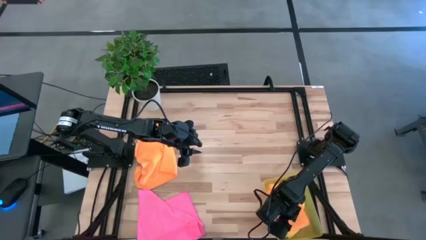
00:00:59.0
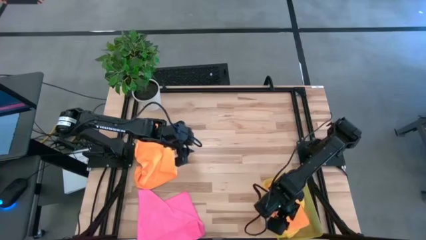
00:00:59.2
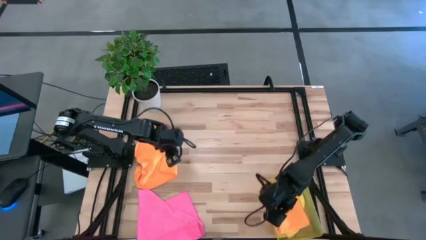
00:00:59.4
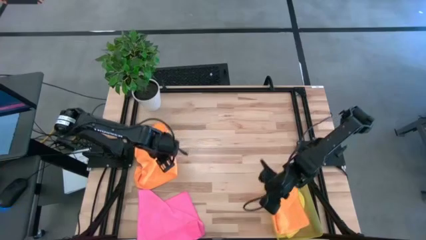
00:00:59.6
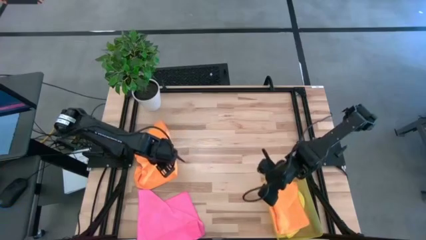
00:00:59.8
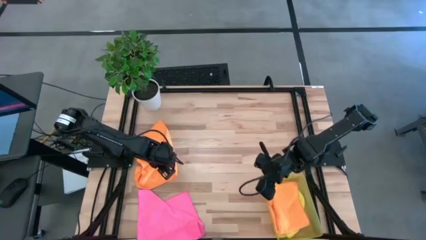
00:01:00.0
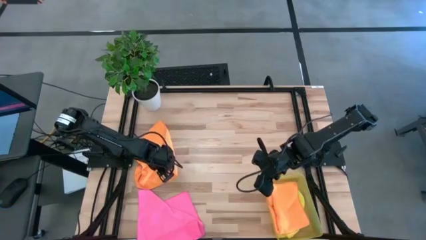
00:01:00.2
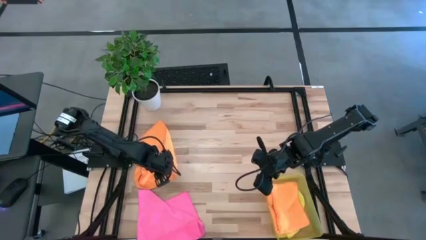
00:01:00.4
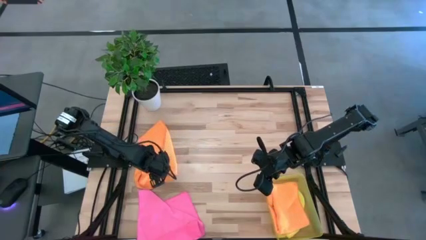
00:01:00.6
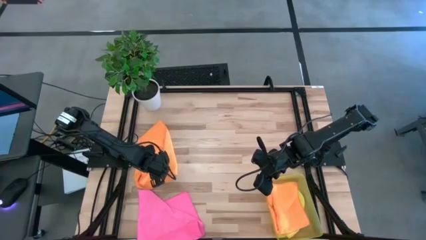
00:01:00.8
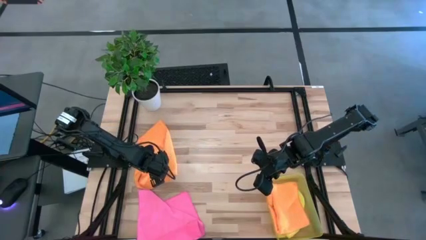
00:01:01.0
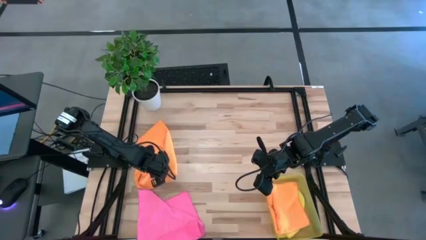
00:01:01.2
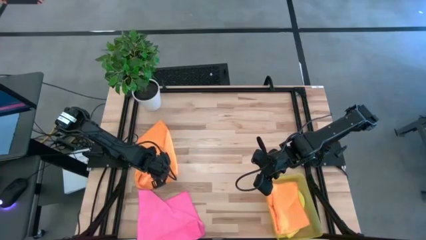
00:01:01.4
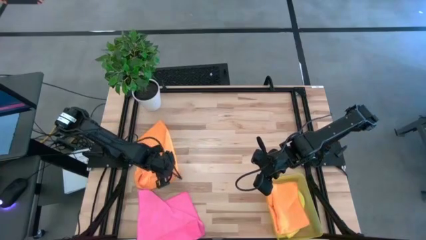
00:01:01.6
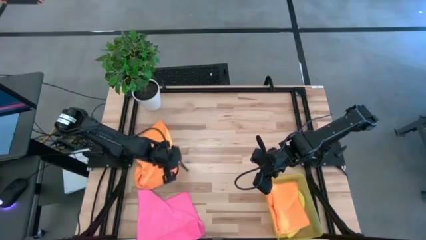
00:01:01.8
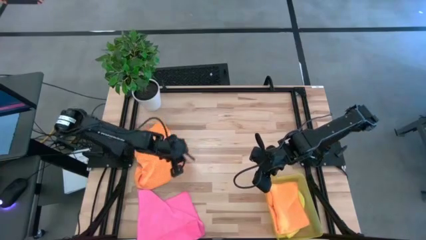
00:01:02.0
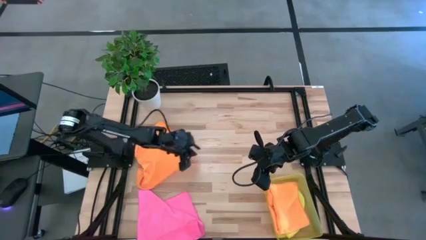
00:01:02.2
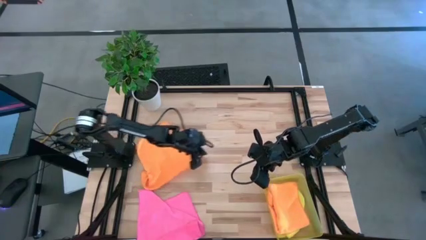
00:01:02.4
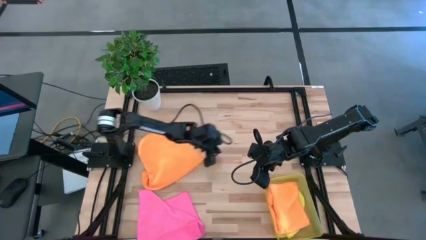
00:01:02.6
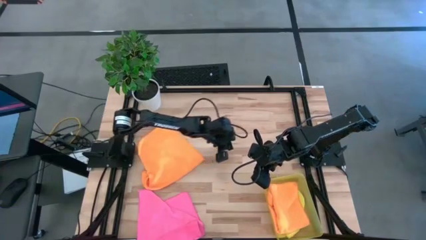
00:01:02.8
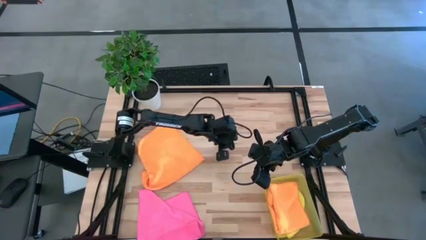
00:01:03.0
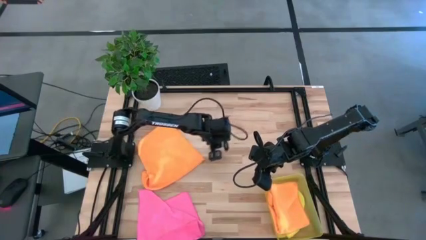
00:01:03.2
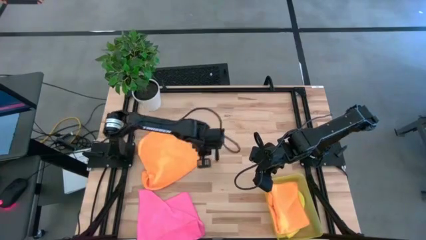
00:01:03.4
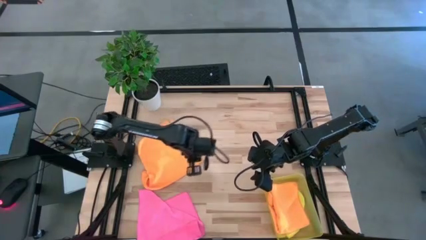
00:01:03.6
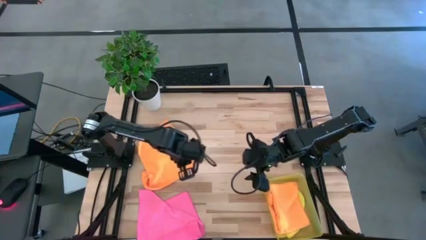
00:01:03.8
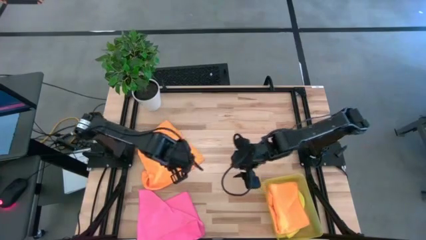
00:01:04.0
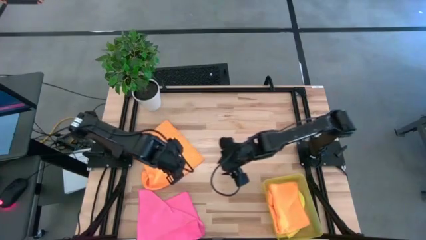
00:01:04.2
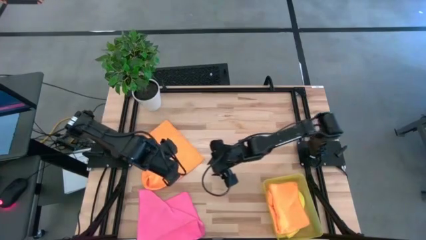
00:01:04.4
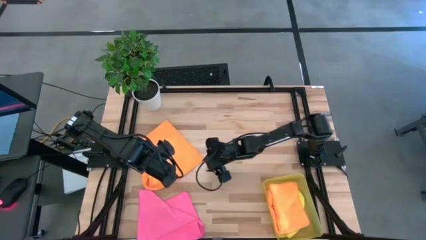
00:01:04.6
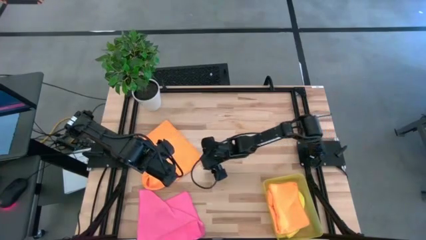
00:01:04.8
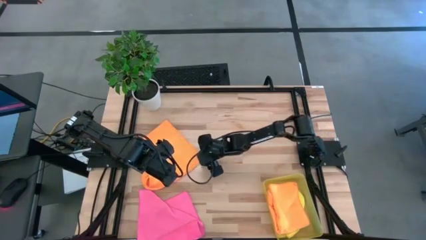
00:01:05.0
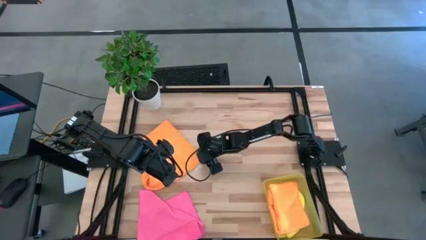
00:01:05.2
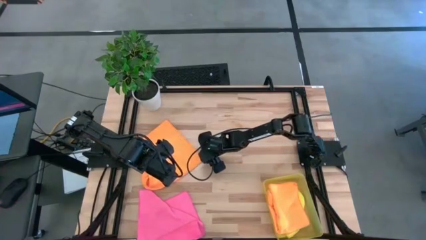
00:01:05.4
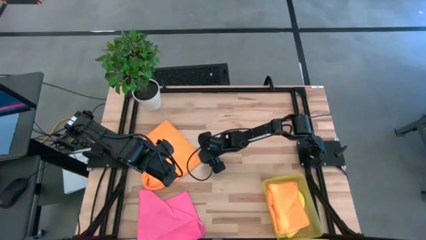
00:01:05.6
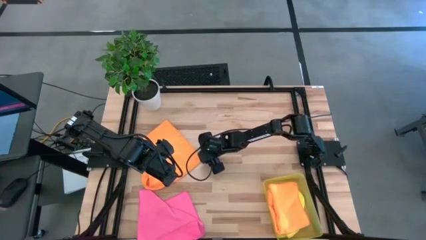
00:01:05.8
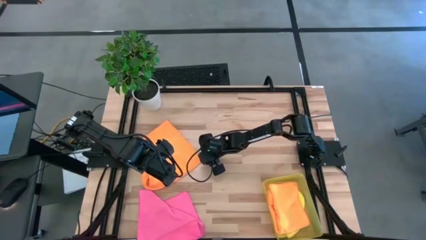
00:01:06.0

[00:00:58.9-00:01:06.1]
Task: Fold microfiber towels
Fold the orange cloth

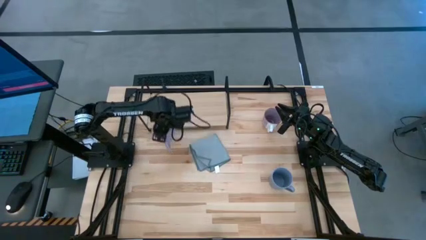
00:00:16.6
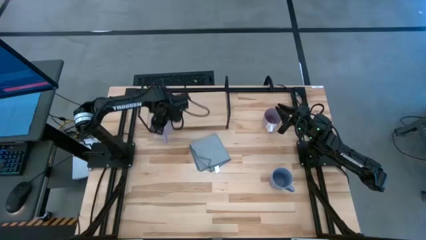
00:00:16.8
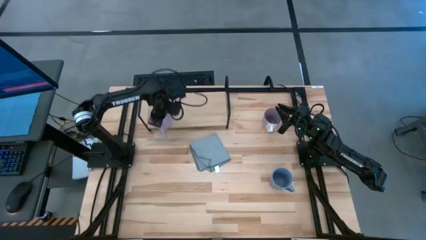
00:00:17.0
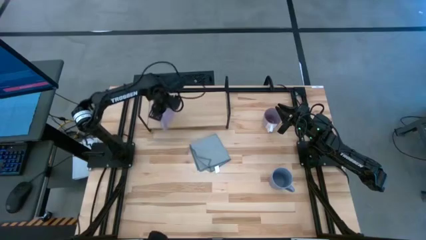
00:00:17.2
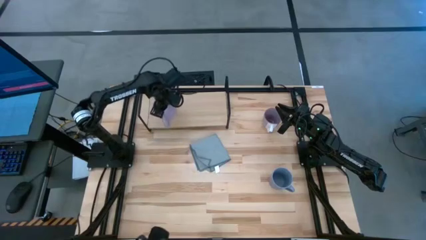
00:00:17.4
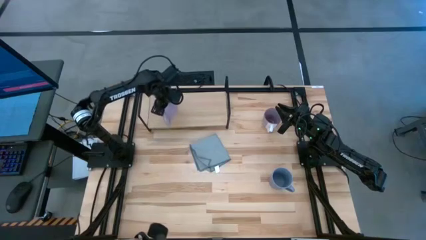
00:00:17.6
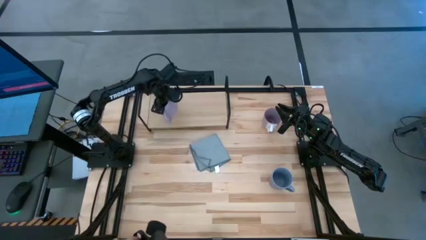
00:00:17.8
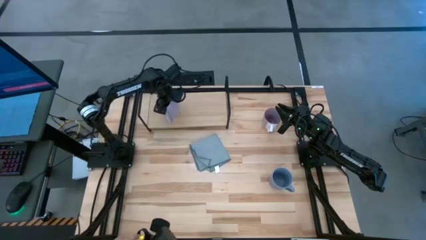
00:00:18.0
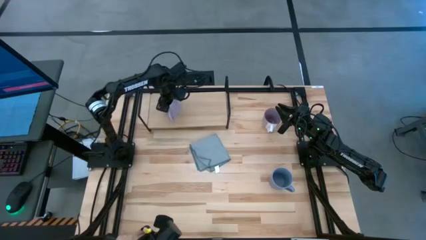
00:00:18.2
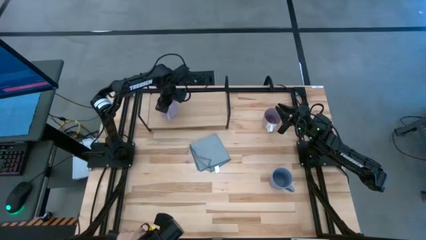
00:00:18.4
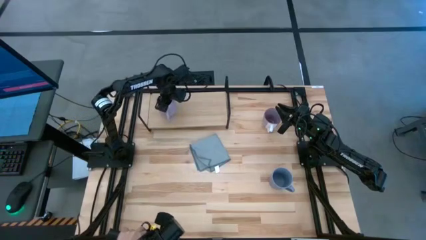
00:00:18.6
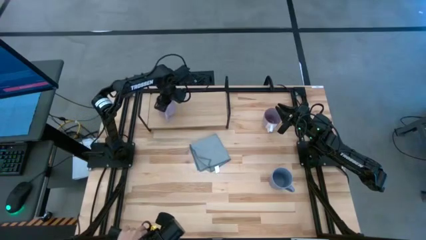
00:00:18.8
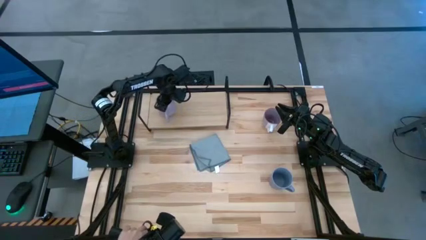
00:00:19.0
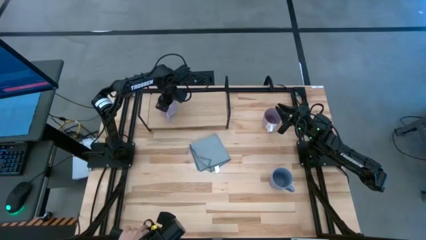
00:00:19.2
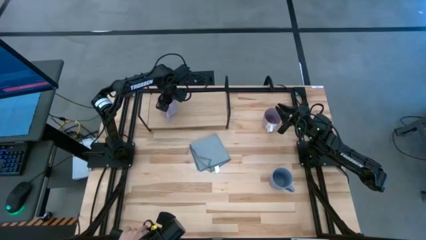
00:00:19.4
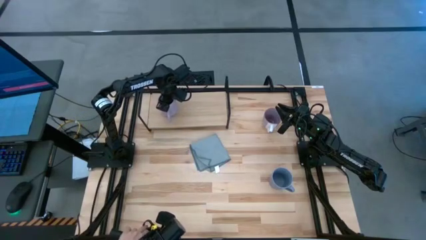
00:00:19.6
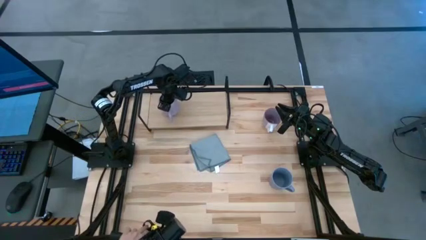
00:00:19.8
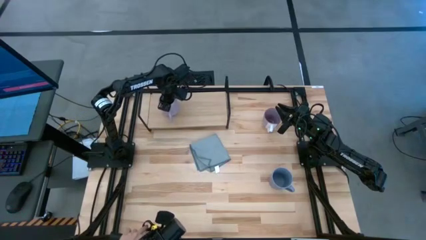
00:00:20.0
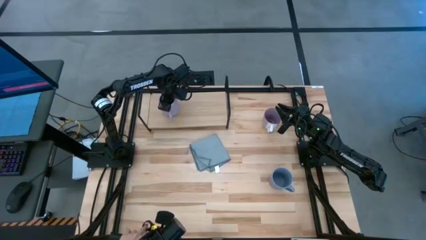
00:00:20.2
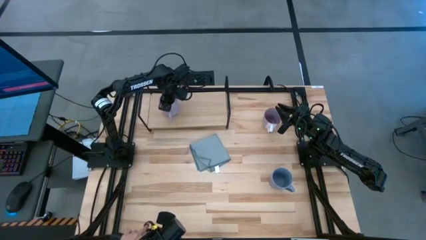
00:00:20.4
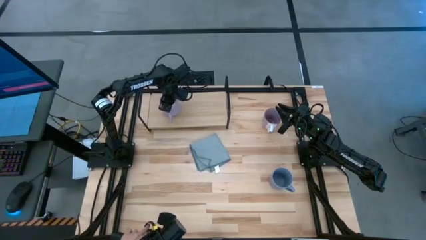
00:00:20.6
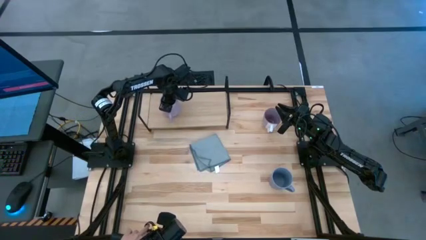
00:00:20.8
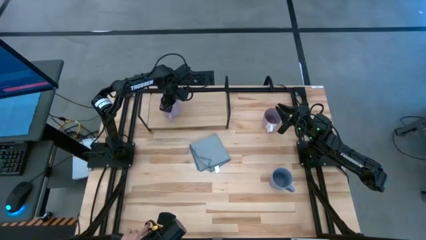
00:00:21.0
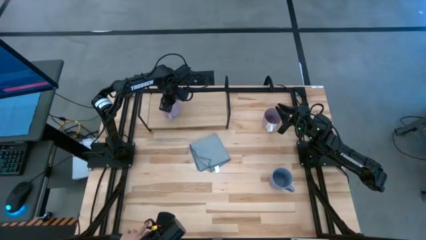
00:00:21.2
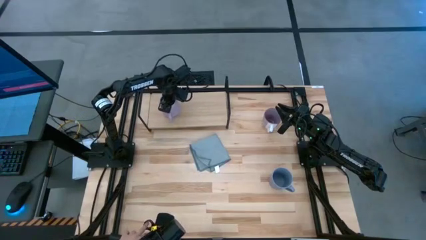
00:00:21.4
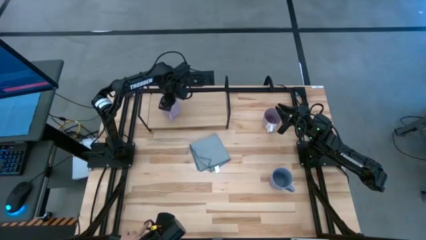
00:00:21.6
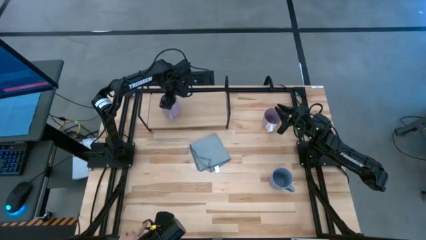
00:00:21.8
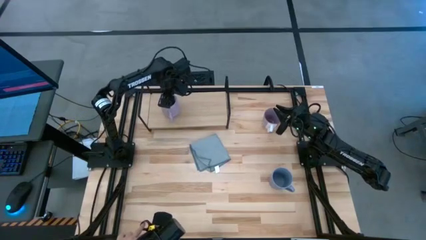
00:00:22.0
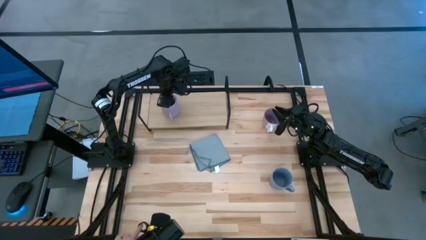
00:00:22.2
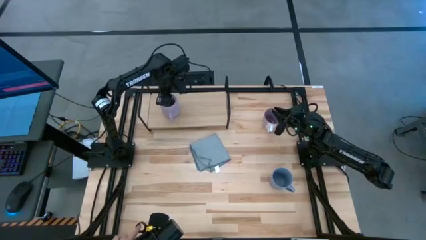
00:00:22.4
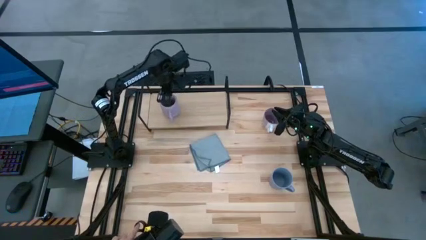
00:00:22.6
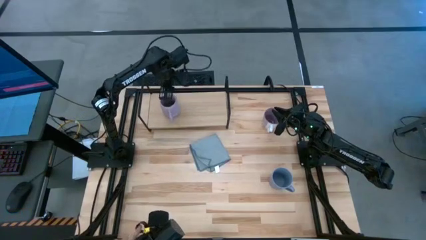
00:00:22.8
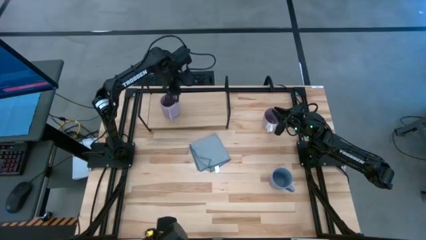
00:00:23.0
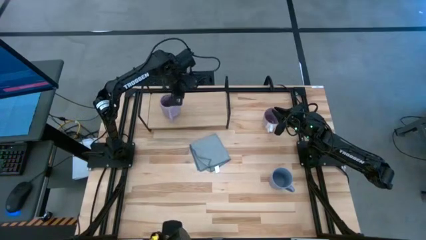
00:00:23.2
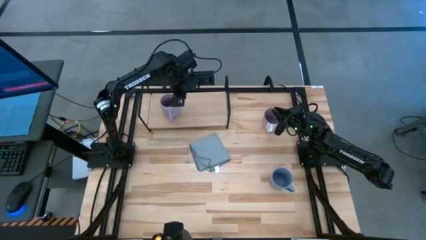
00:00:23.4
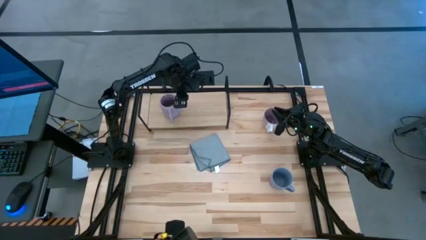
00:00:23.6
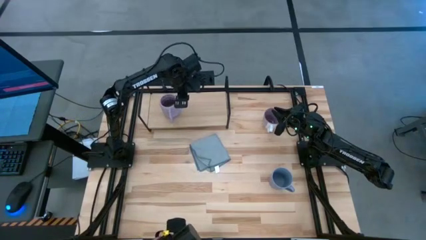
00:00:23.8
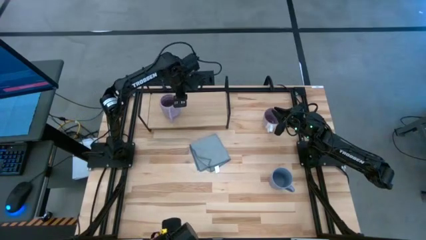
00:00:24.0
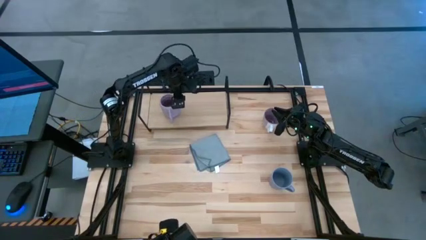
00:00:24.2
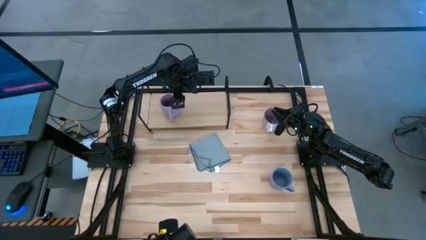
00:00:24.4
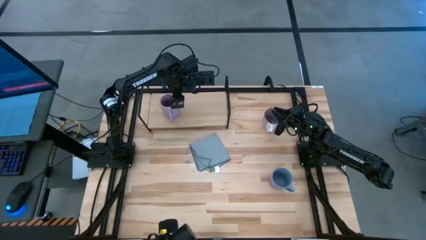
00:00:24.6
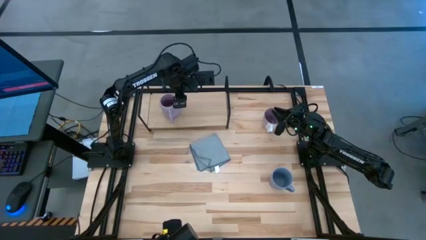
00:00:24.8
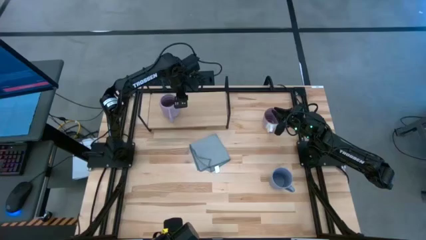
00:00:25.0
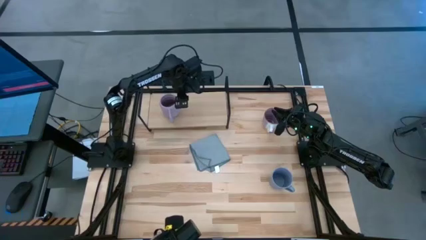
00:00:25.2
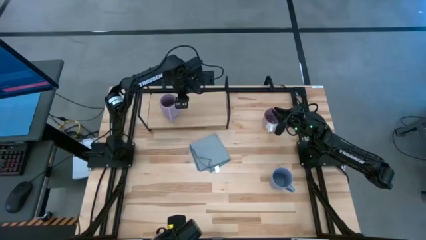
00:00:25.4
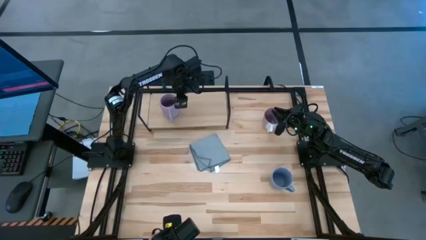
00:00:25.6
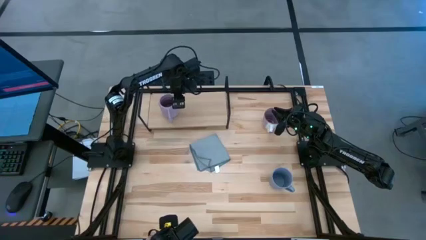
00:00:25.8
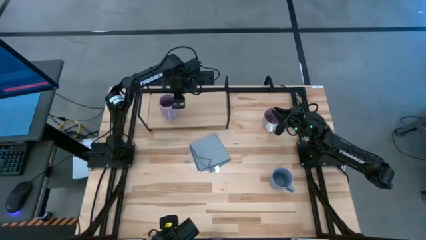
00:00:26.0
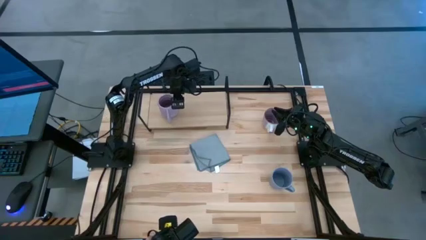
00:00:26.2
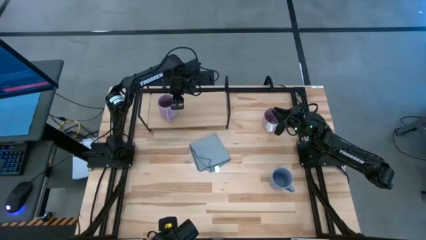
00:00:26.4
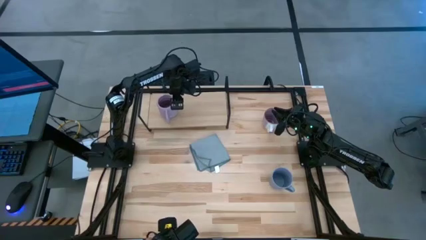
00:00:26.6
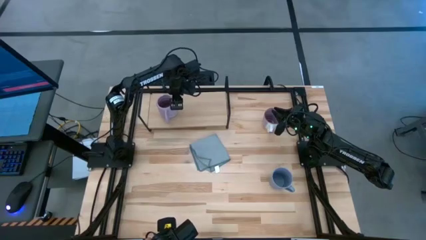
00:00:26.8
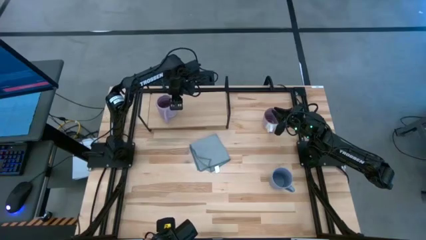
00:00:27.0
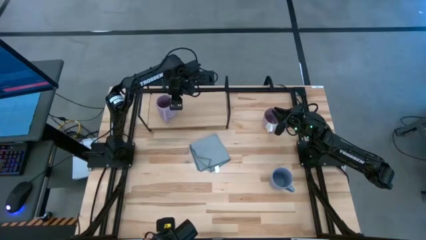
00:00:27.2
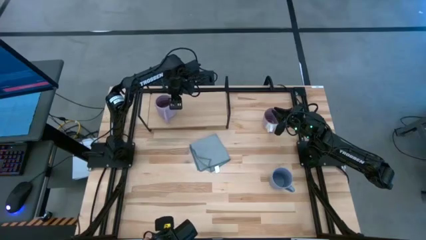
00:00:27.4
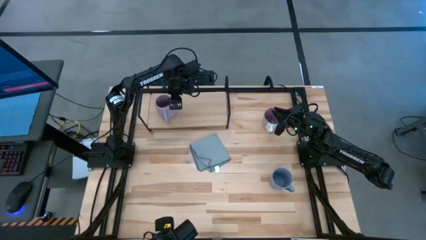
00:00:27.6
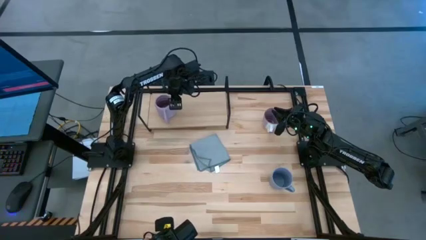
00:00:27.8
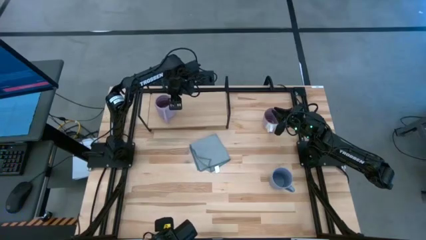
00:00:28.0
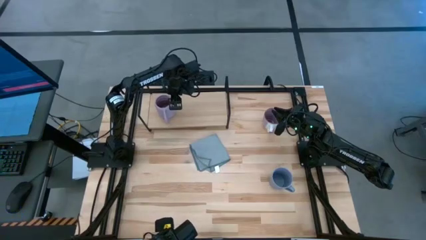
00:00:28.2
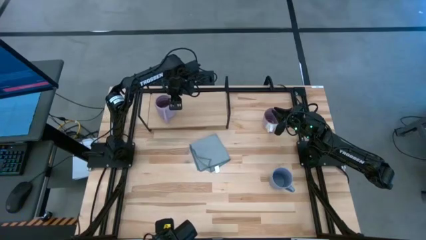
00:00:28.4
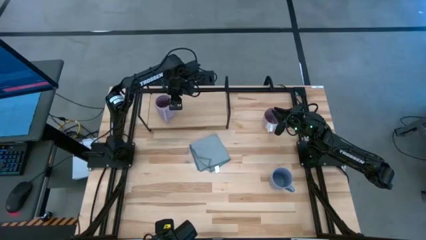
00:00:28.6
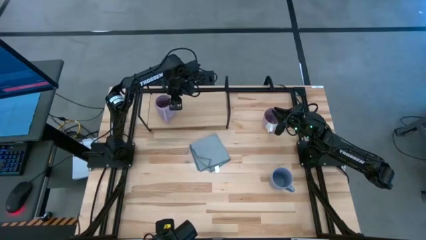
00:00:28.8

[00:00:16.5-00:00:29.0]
Task: Stack small to large cups/mugs on shelf
Put the violet mug on the shelf
